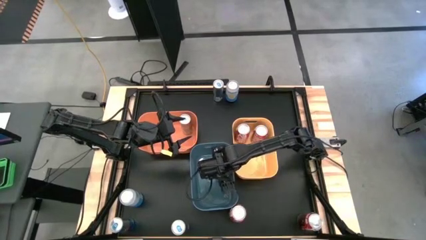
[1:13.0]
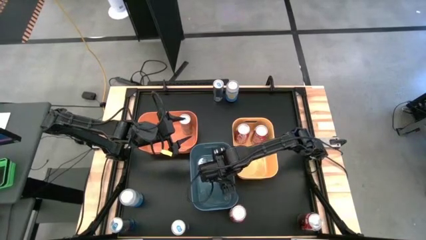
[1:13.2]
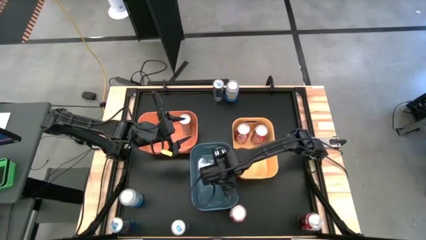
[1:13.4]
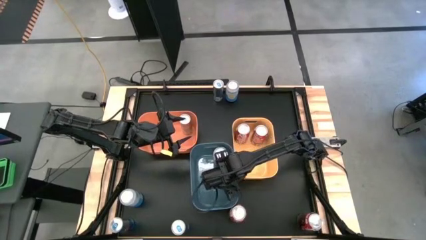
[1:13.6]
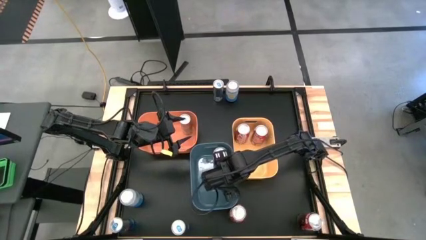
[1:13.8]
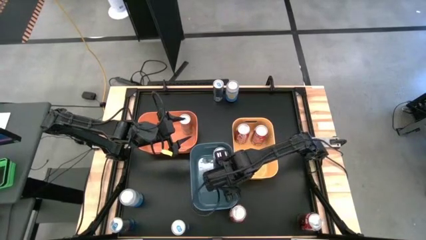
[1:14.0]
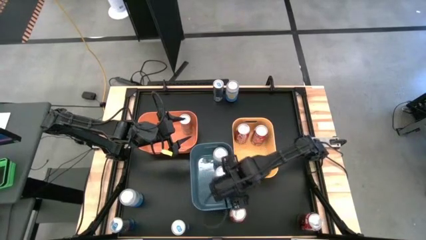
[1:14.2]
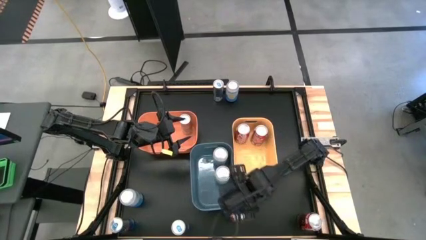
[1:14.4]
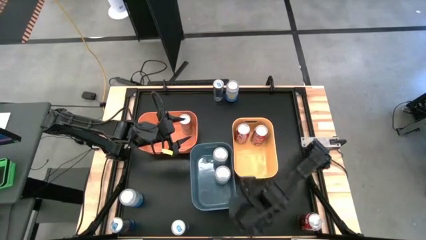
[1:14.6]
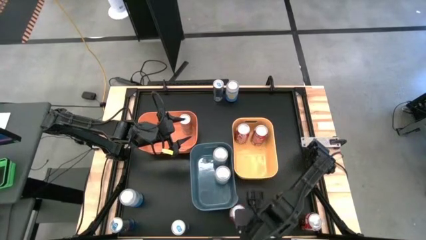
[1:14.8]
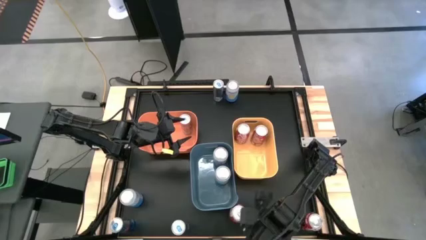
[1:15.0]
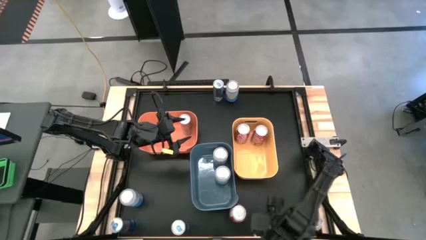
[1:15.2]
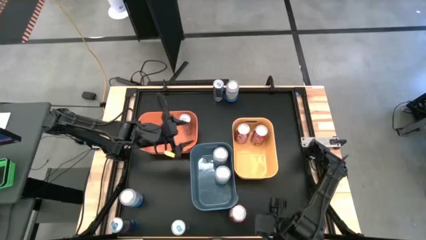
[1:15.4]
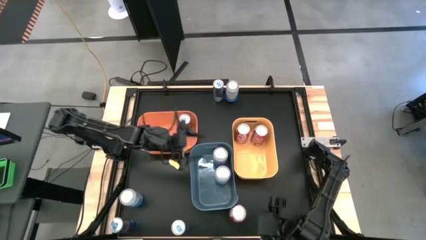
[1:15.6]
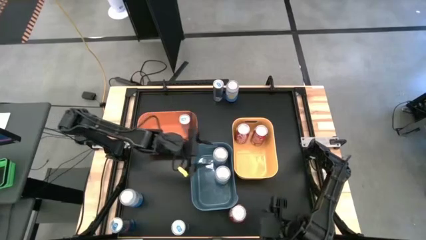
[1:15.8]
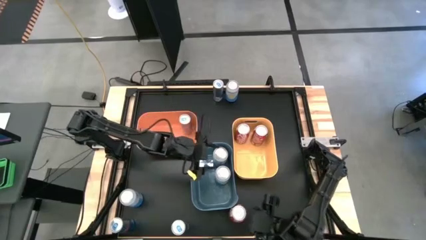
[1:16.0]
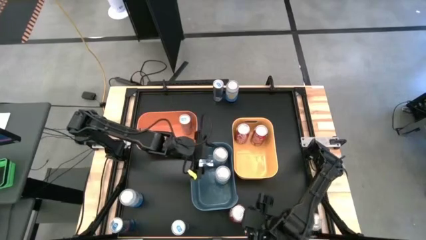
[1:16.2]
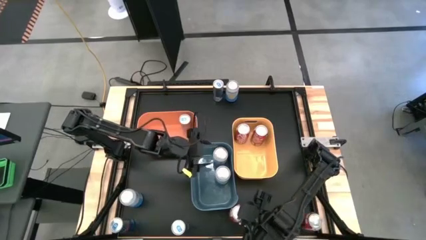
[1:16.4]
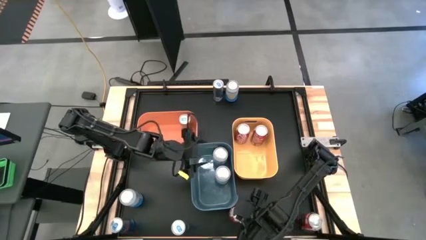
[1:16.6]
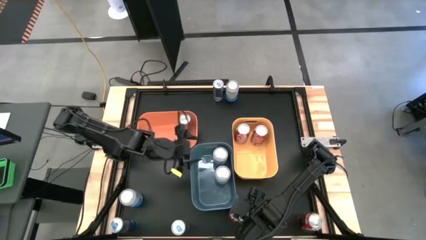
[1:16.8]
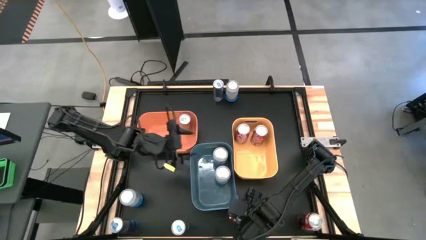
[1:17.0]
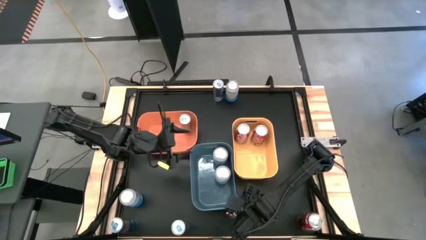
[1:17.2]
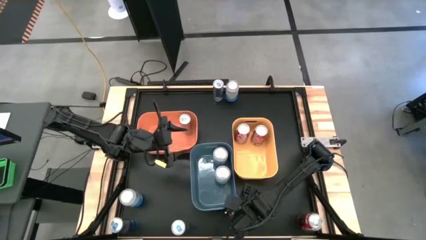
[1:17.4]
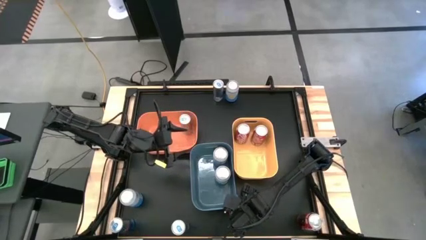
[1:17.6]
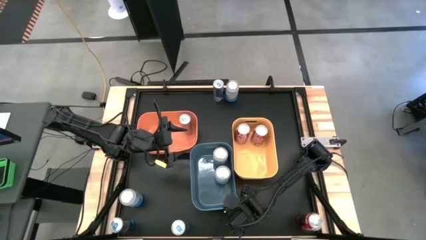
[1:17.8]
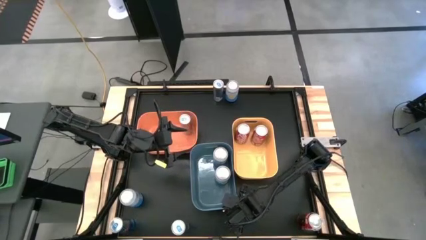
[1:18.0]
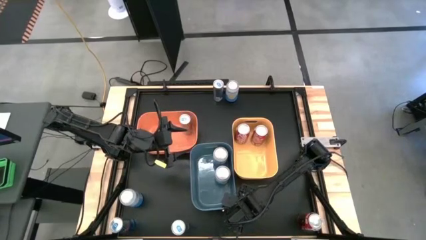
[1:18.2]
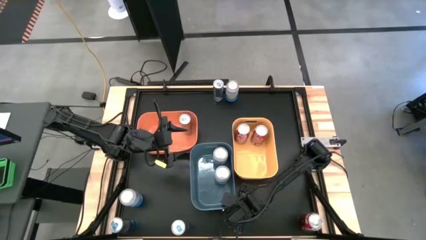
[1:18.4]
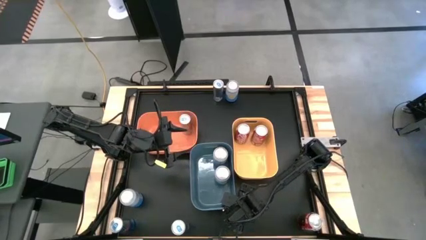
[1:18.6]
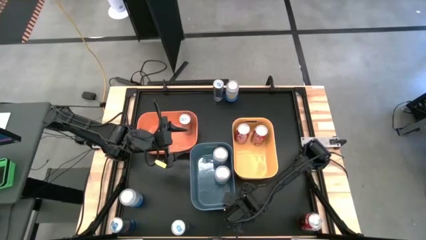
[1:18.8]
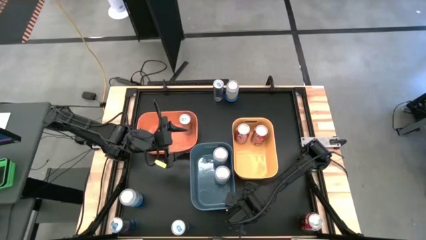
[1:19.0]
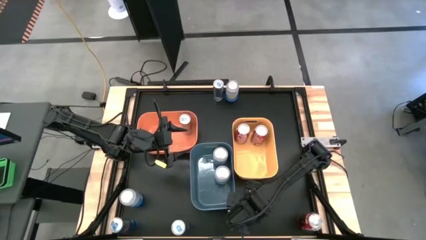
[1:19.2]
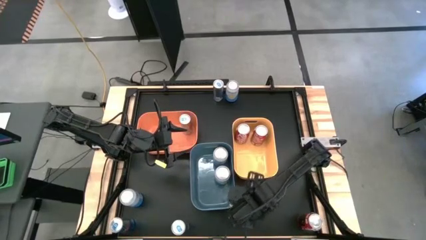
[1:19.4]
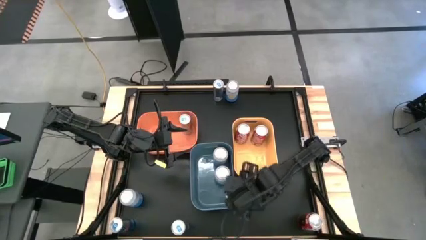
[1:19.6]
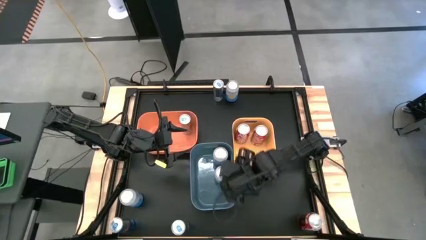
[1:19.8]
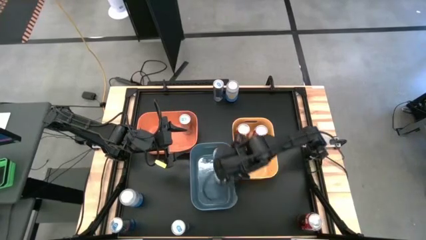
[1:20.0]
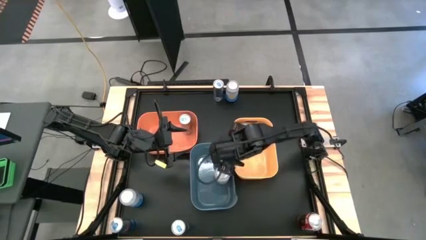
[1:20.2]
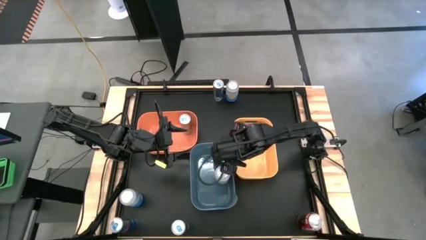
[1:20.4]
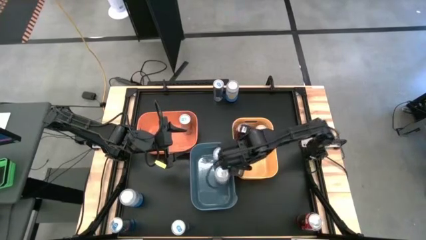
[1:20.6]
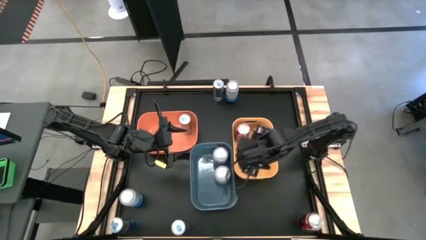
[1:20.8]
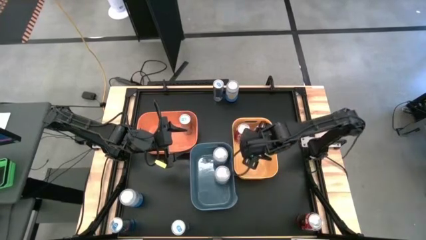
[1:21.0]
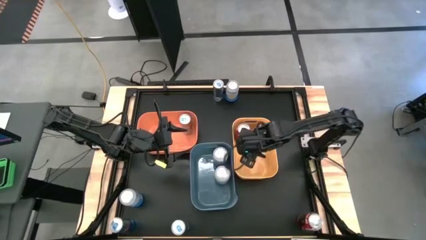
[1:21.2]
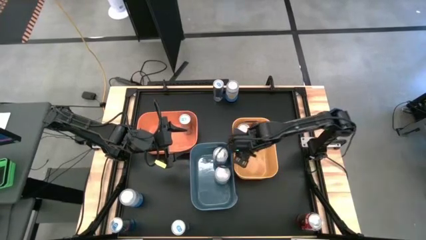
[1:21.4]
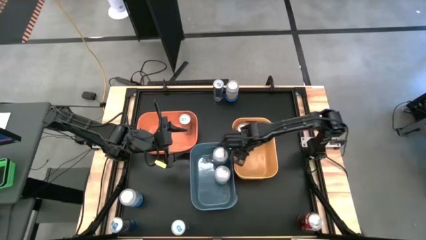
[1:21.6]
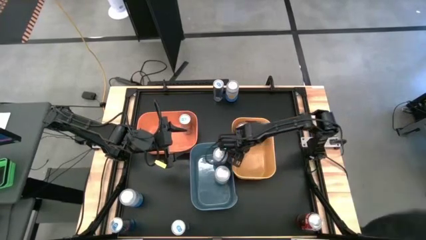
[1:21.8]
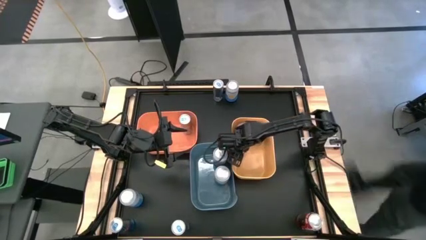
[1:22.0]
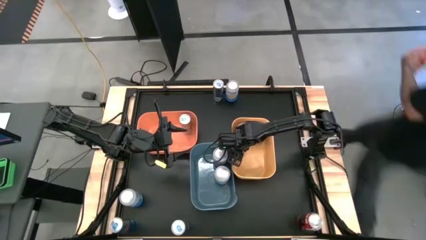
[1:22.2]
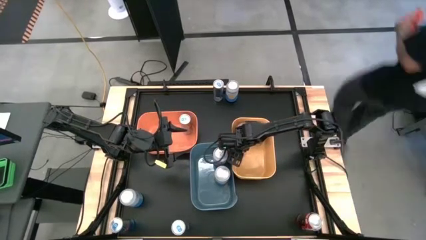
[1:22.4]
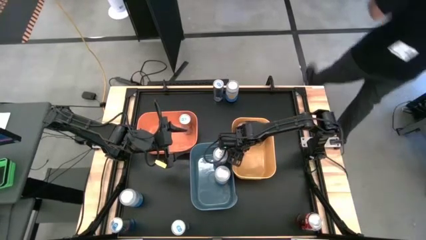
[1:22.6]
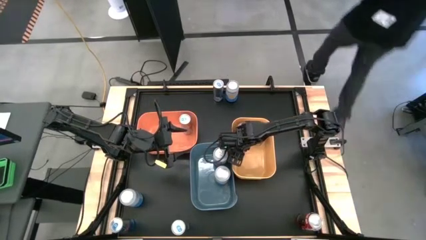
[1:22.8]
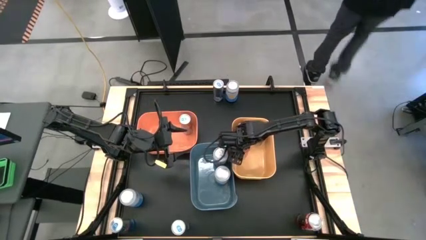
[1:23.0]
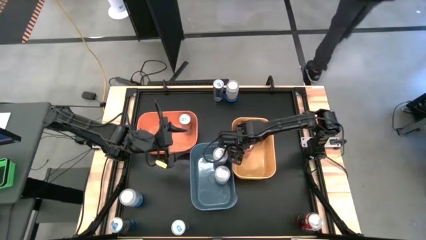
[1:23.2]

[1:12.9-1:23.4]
Task: Sort soda cans
Put the left red-white soda can into the yellow bin

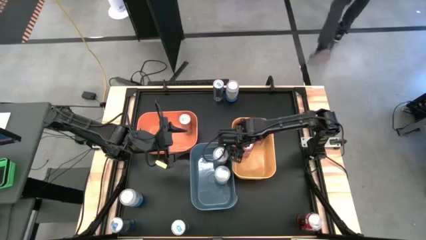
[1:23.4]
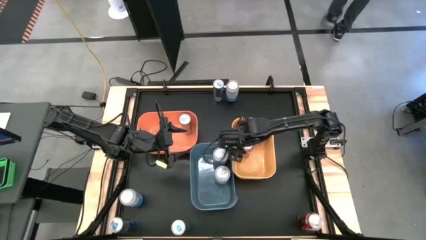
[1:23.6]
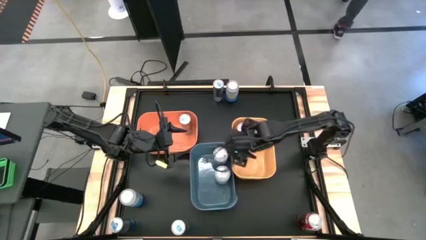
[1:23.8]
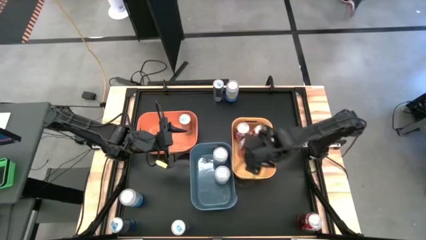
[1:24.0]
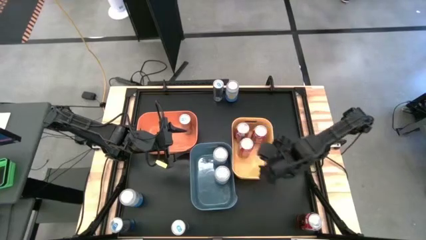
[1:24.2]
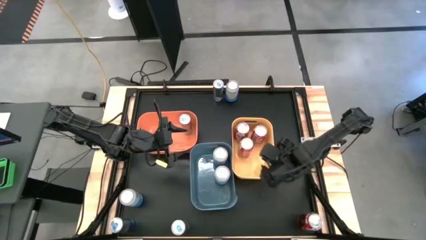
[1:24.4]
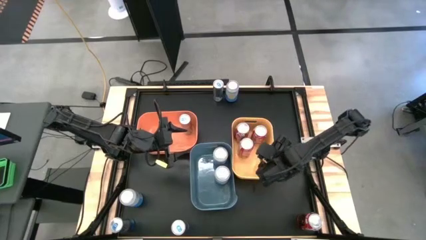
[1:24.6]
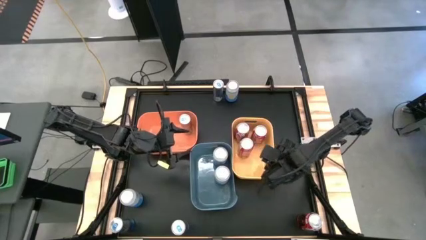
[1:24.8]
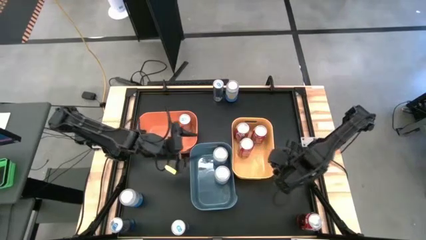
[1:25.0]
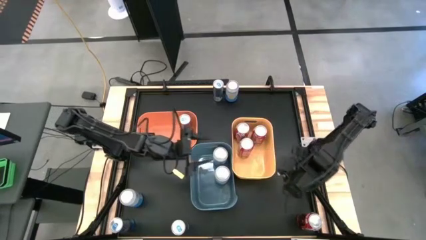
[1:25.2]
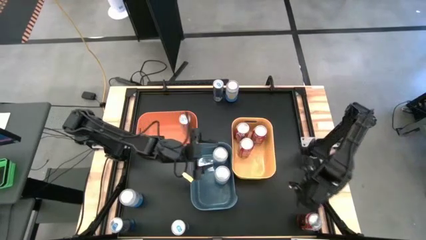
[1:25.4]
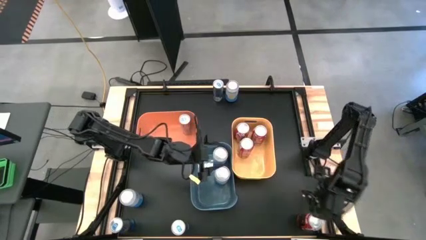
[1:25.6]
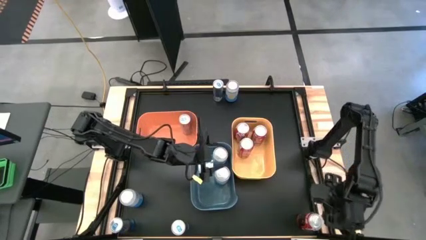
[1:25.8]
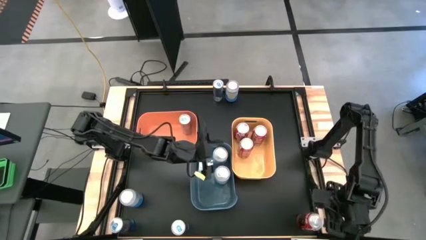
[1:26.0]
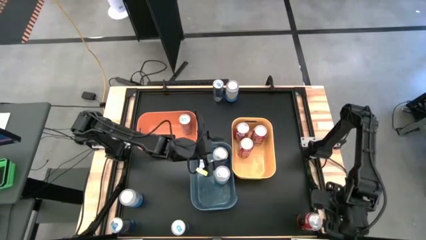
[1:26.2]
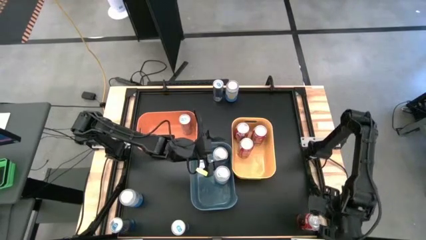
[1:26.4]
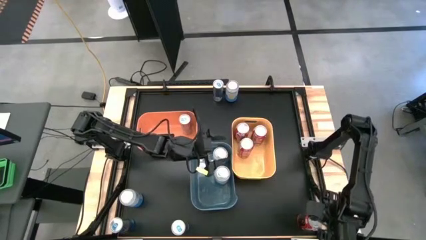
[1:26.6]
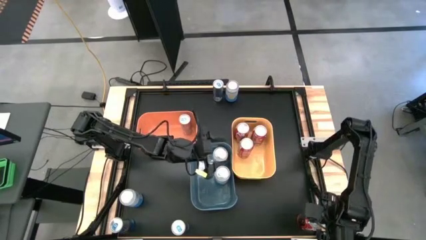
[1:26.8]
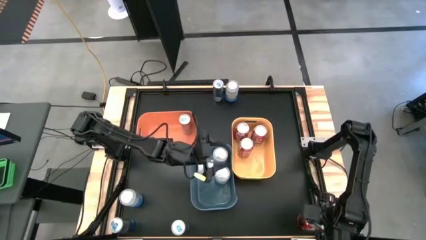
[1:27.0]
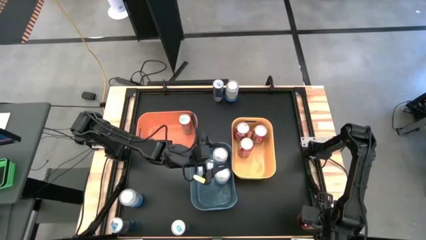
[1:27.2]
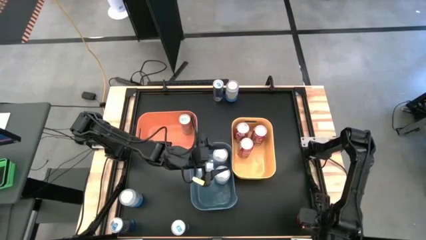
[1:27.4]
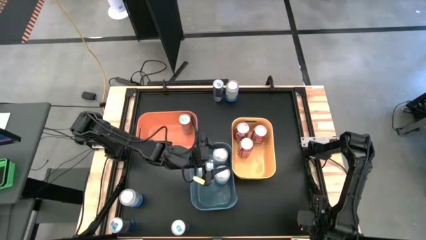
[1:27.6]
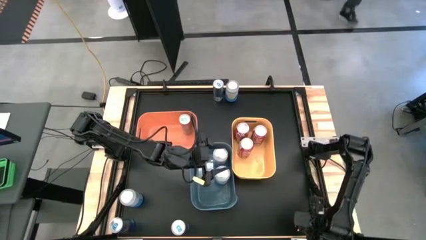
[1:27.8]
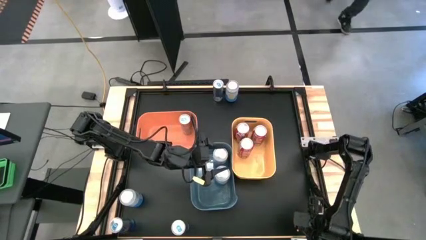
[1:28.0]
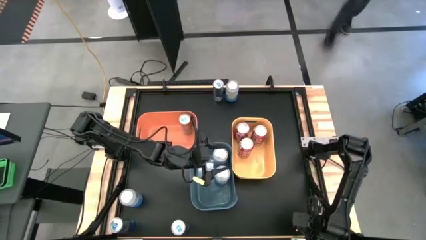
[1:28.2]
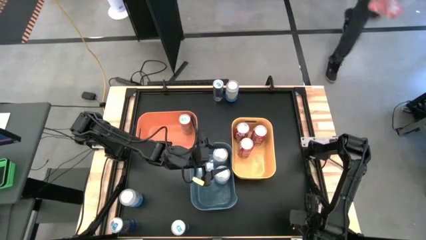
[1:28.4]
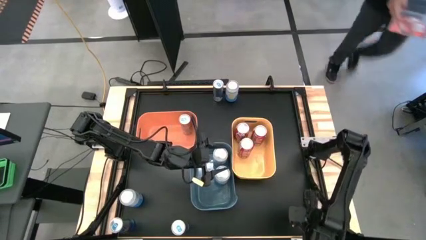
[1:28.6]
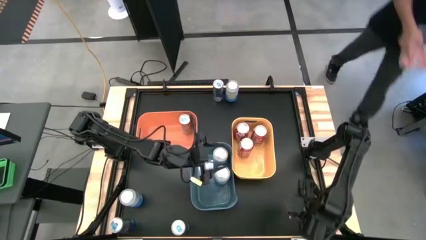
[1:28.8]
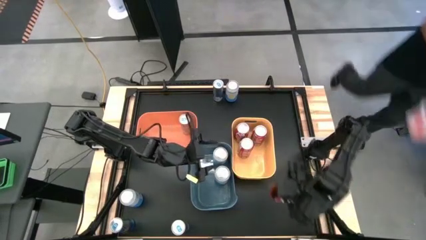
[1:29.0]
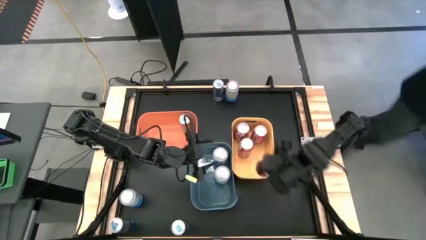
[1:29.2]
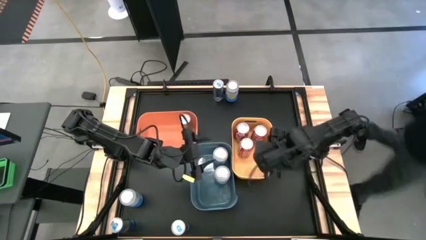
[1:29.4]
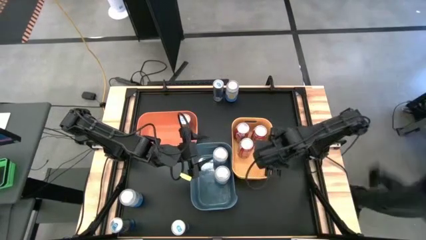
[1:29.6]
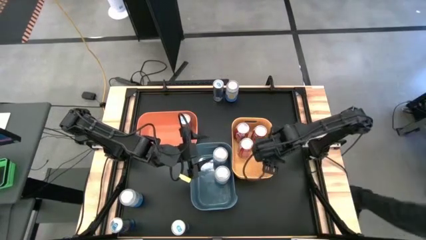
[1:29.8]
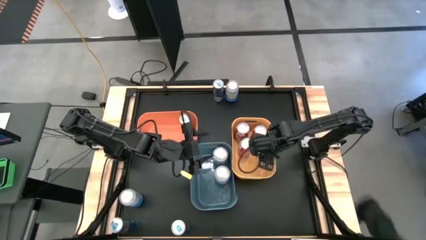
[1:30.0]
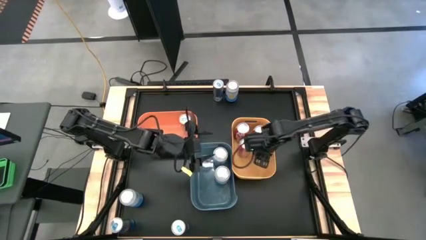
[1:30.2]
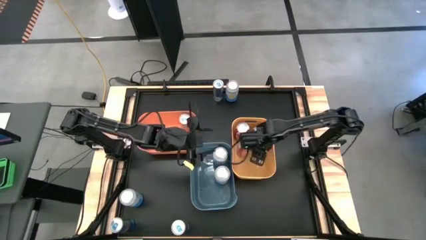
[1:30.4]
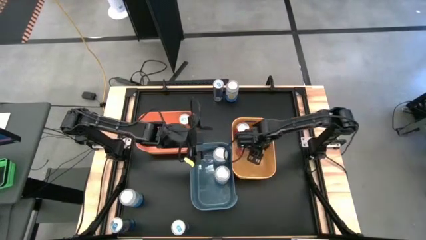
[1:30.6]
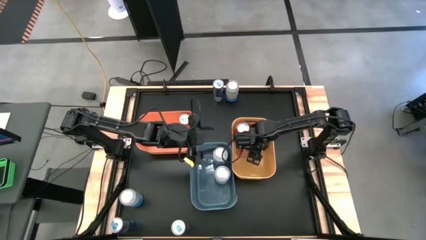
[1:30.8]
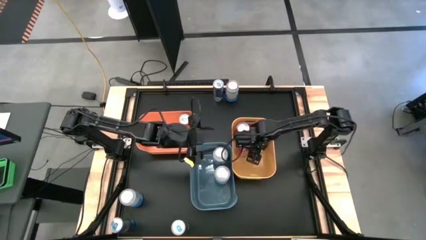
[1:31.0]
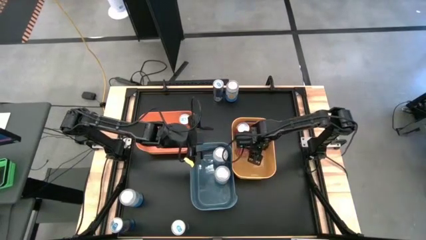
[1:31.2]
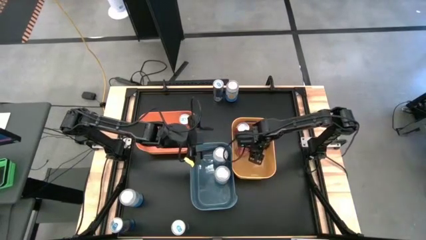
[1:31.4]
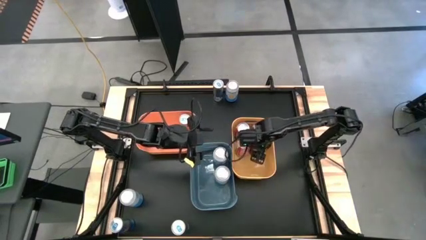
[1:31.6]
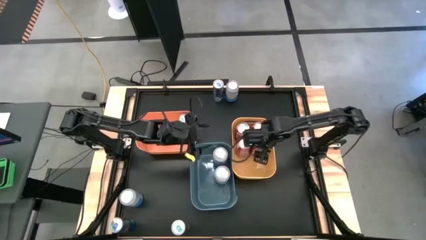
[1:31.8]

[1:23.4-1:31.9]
Put the red-white soda can into the yellow bin
